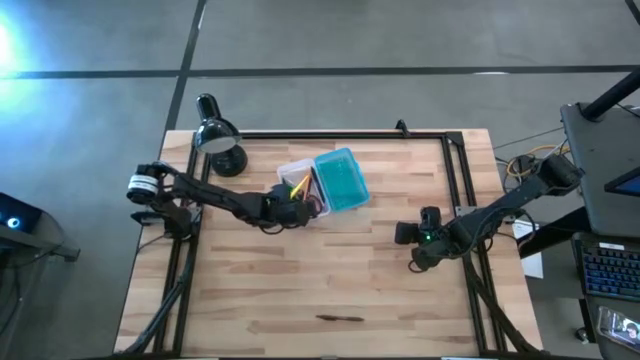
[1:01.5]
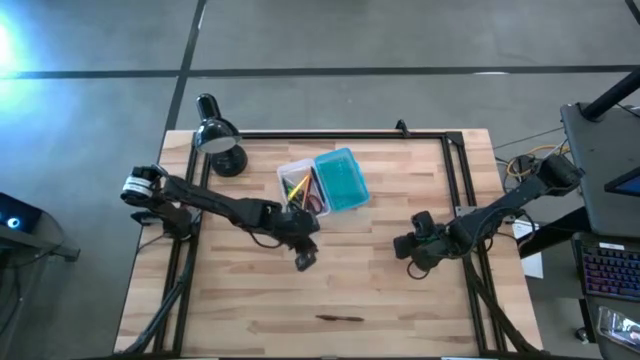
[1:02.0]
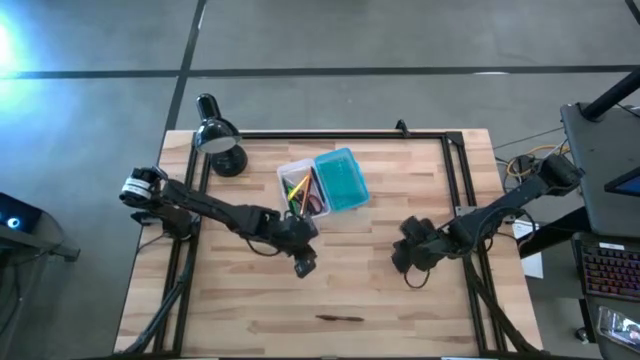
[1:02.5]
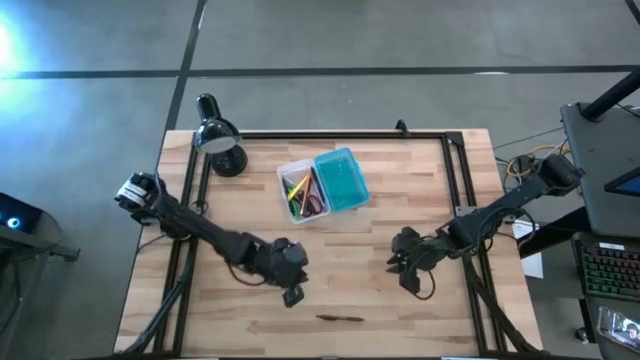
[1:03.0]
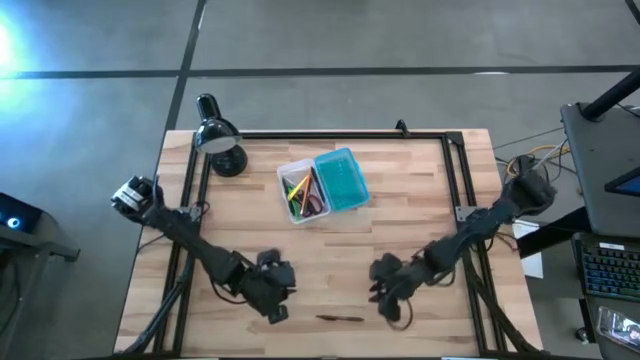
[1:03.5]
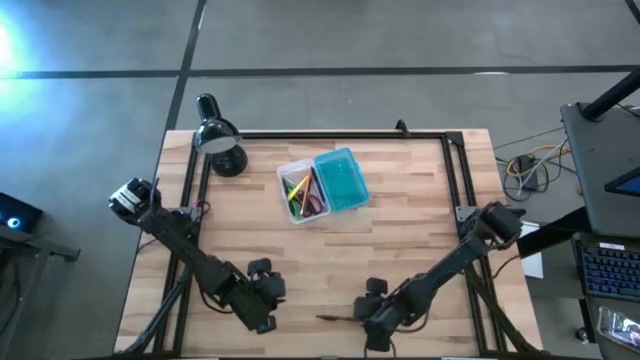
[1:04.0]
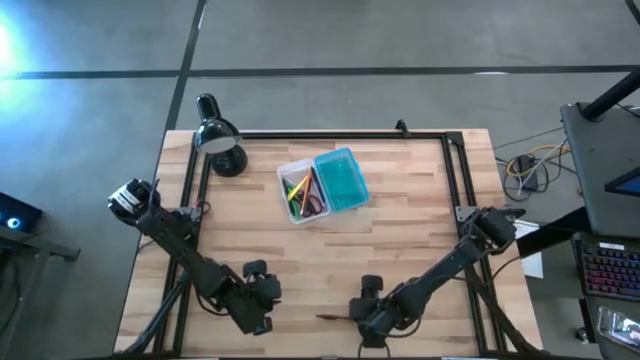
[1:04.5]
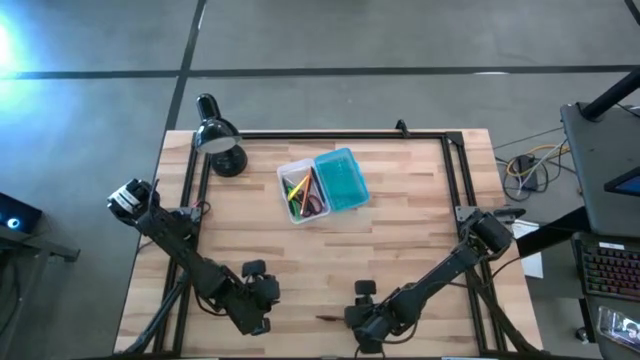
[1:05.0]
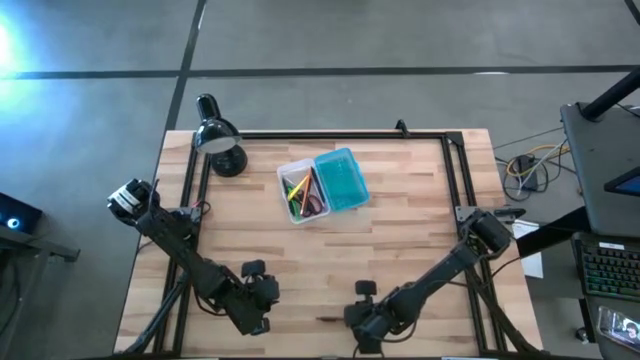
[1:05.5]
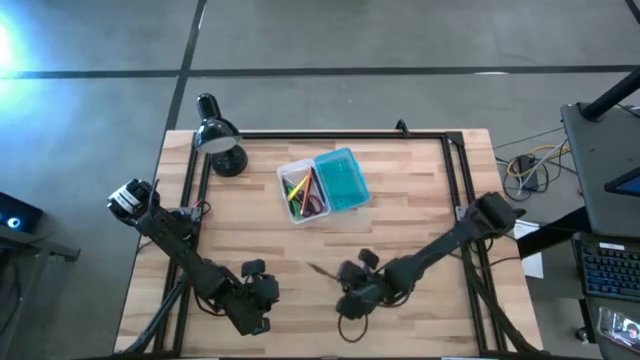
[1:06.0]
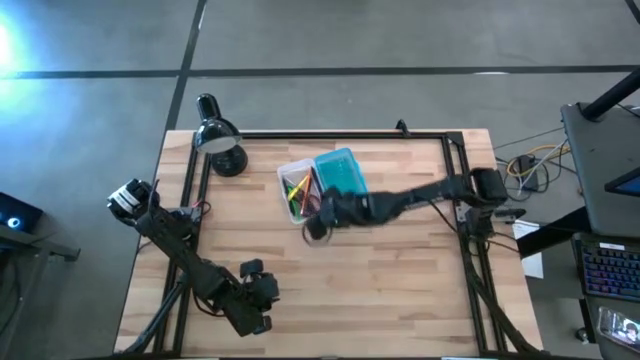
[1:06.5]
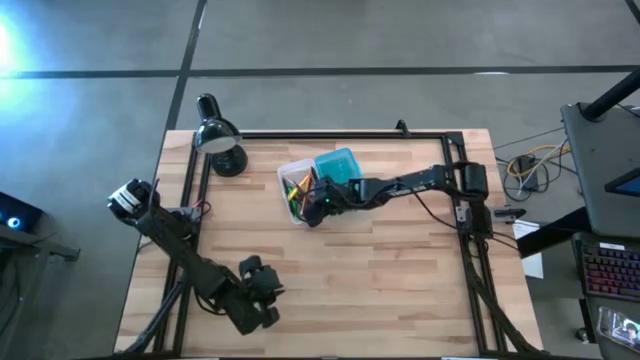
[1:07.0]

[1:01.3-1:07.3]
Task: Pick & place school supplies into a supply box
Put the brown pen into the supply box

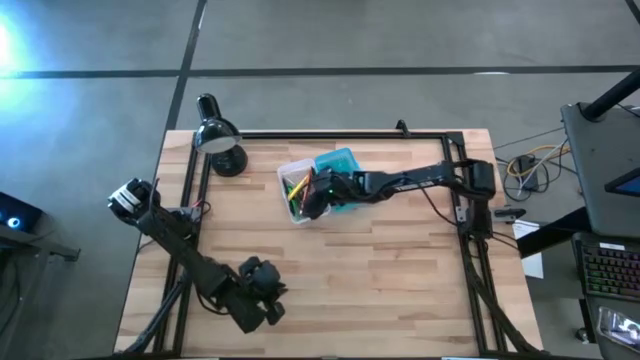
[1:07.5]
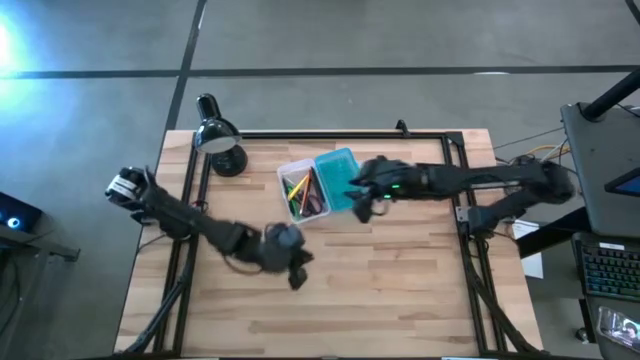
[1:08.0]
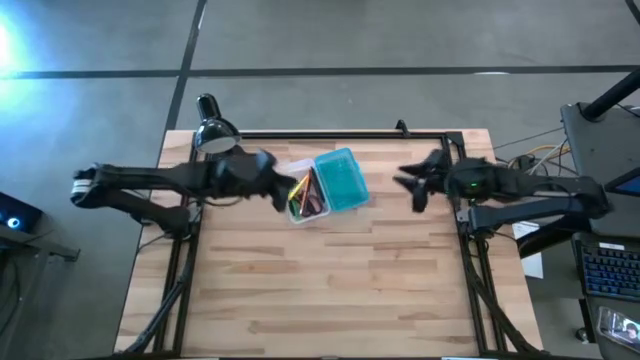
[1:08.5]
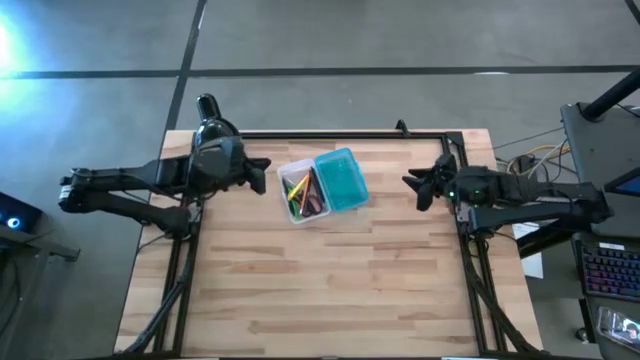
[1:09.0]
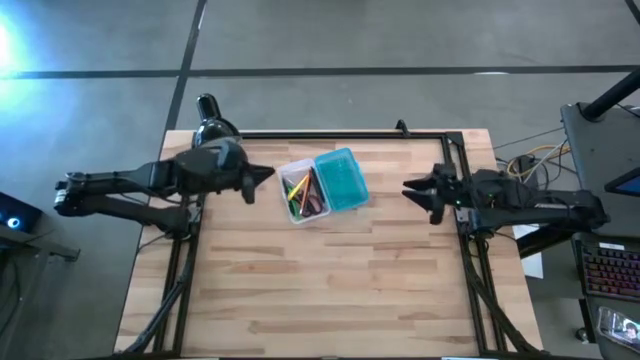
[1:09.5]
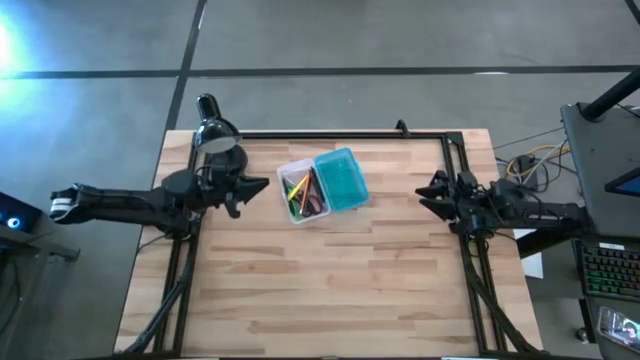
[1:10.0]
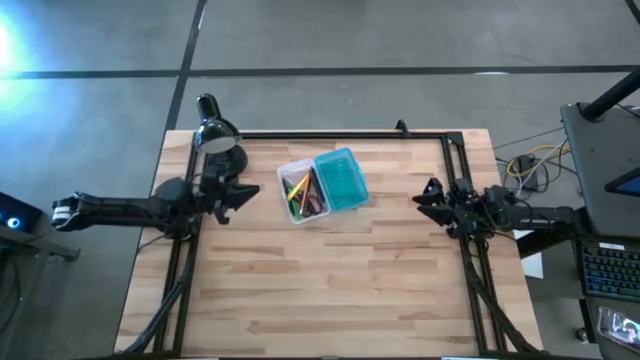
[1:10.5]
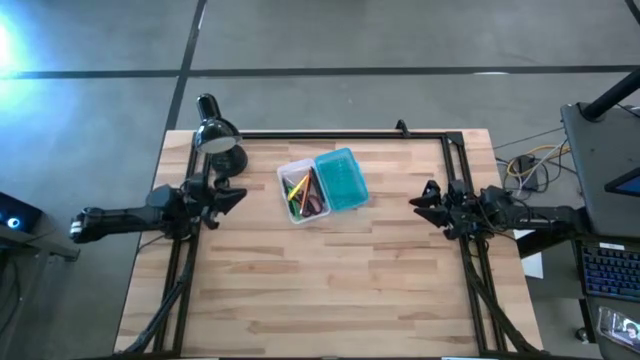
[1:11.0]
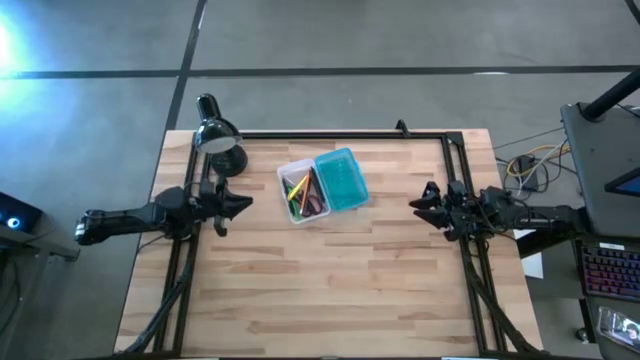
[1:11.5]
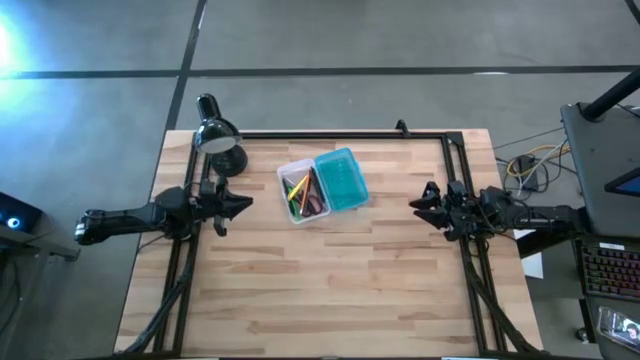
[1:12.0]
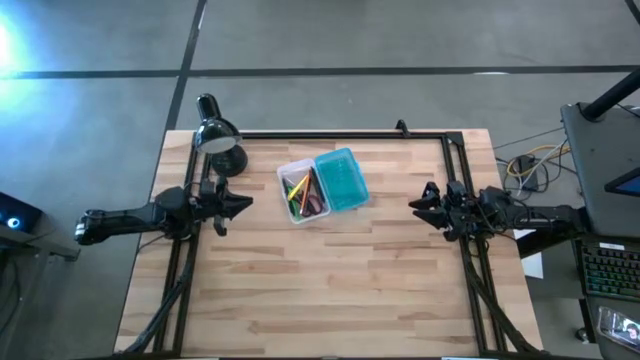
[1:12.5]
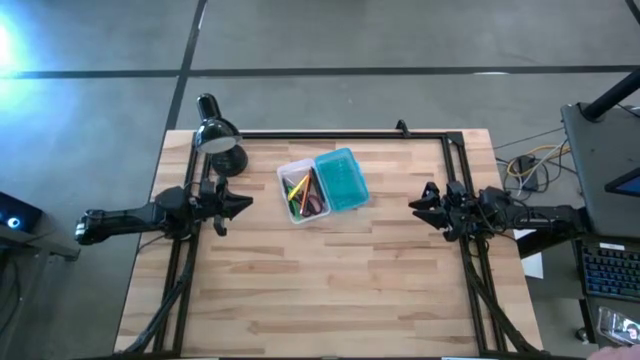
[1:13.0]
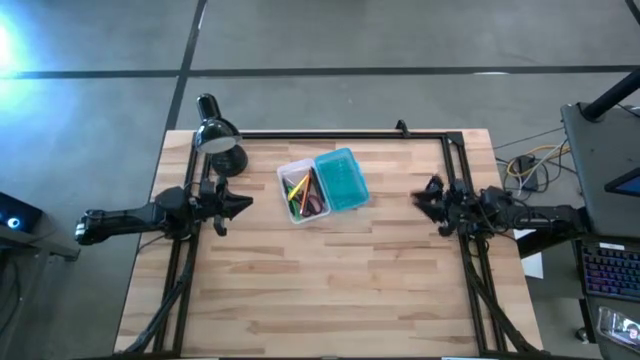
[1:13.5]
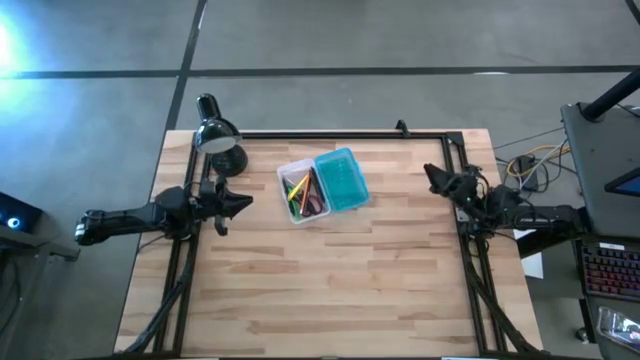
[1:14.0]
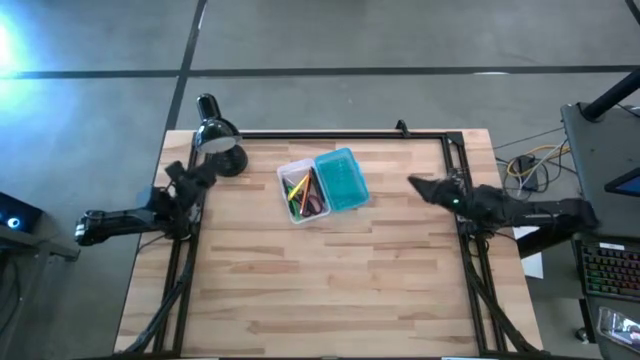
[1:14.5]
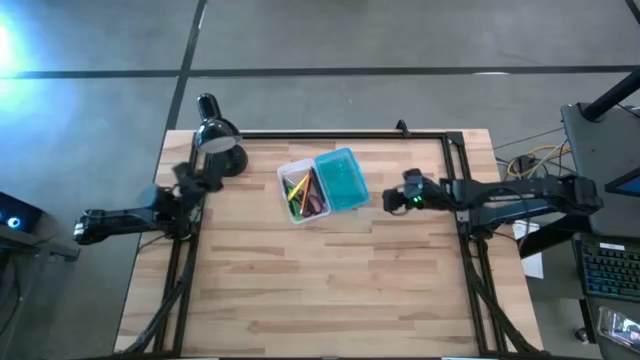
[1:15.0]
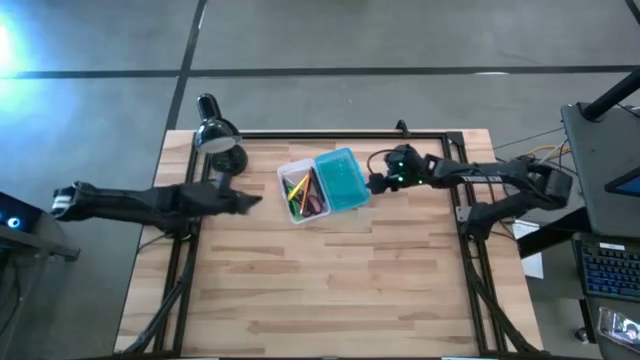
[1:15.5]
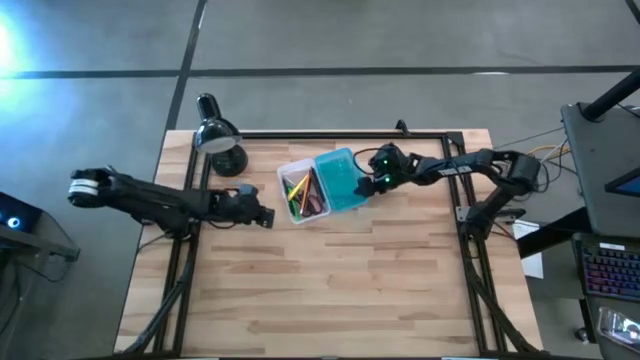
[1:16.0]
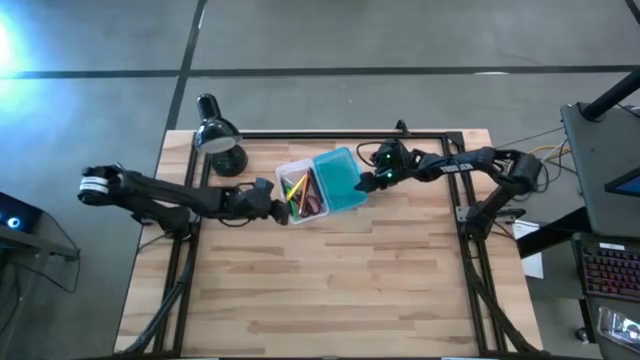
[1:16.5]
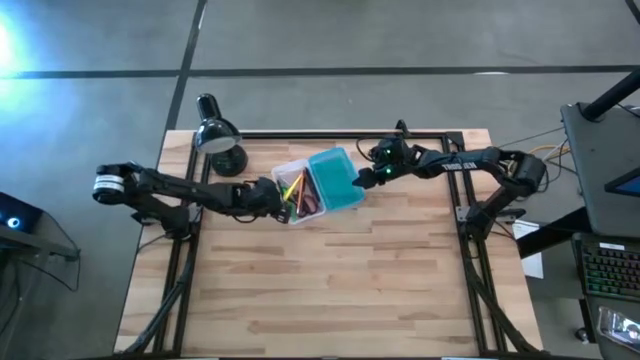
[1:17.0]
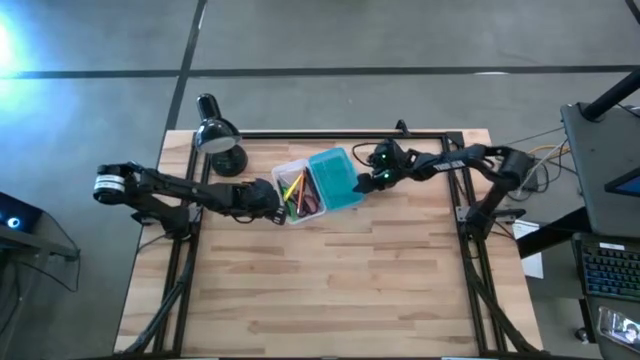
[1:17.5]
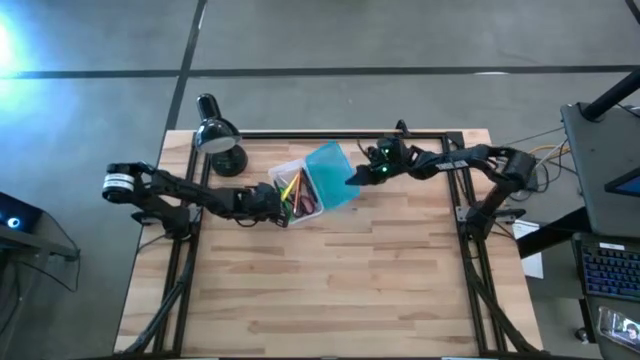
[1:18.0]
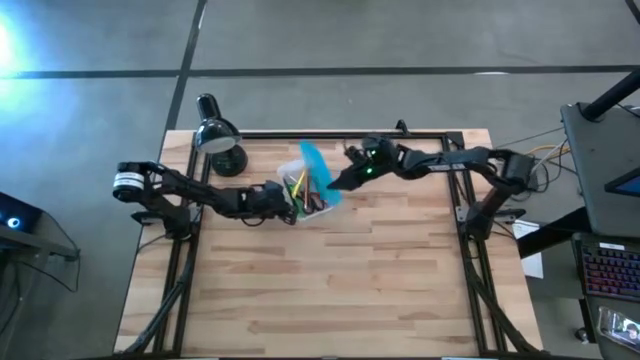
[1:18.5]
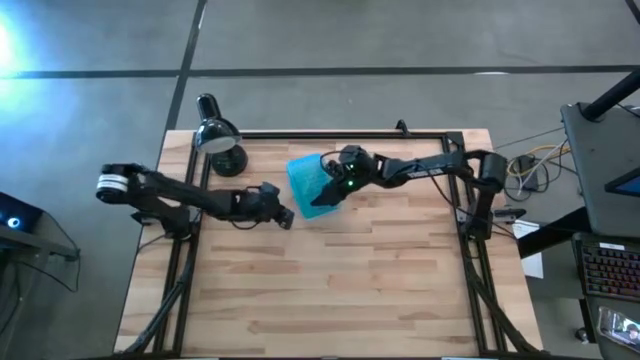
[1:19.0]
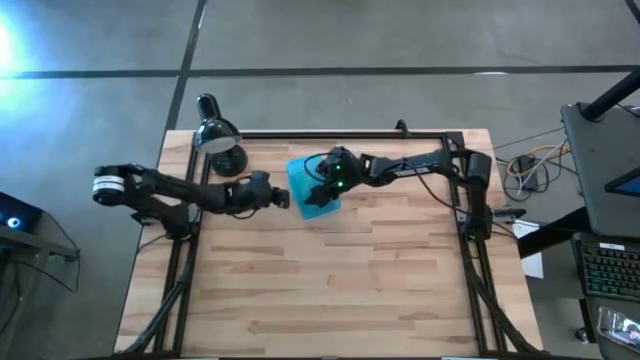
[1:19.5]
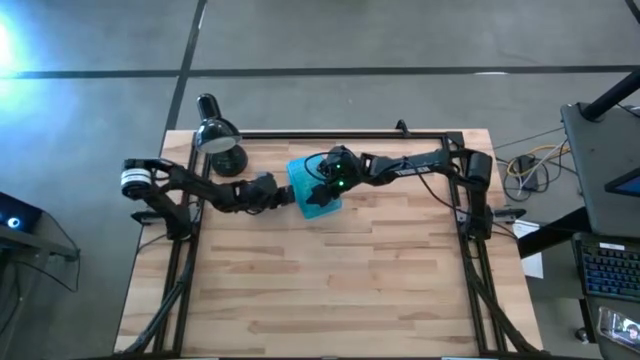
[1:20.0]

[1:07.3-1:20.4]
Close the supply box

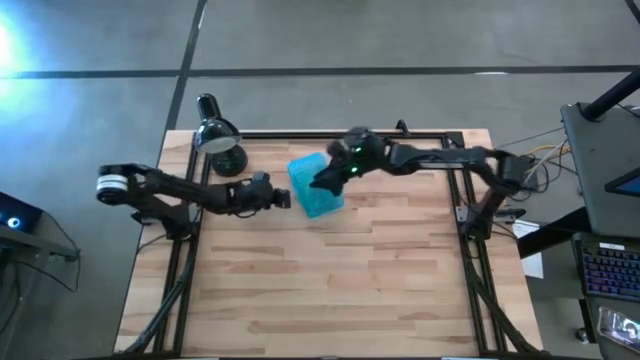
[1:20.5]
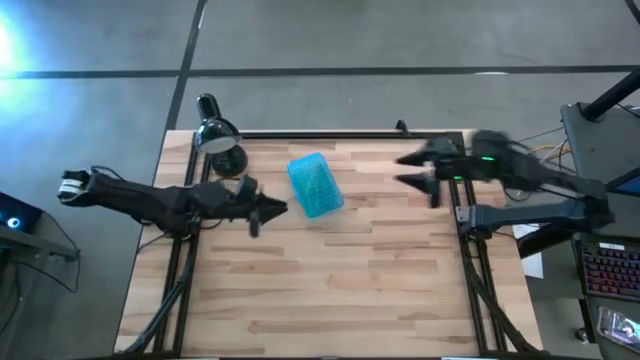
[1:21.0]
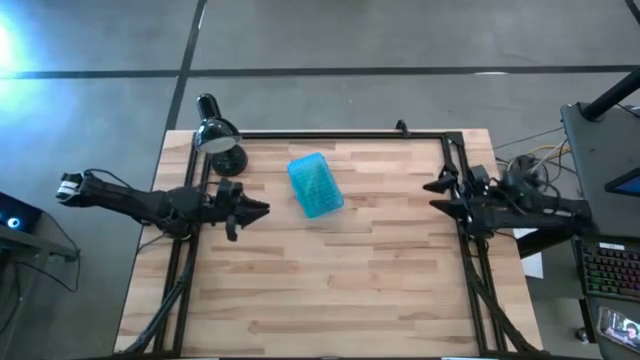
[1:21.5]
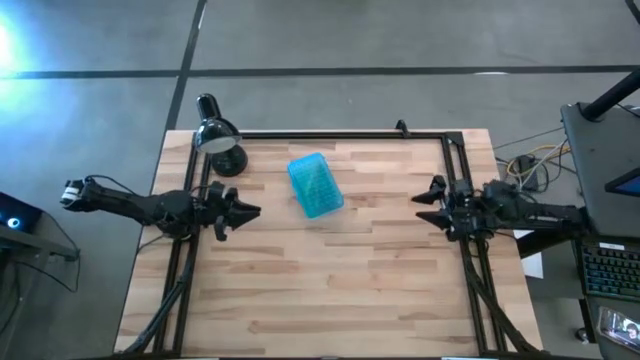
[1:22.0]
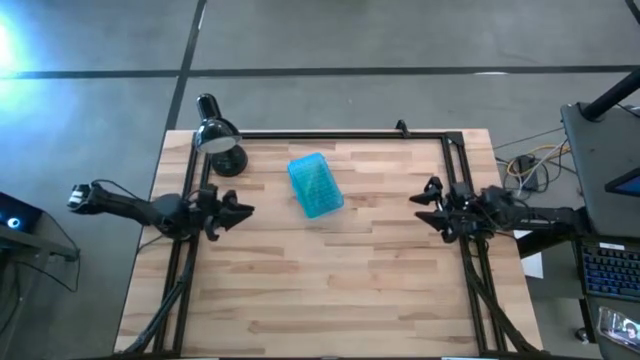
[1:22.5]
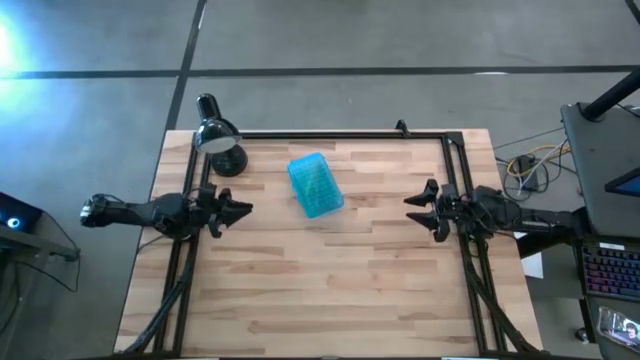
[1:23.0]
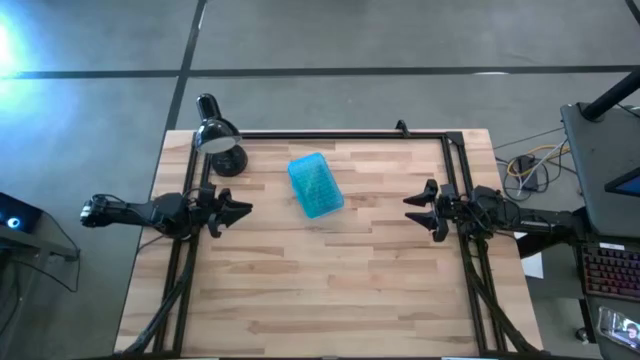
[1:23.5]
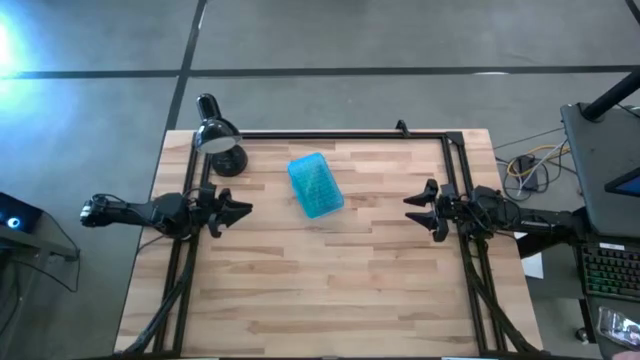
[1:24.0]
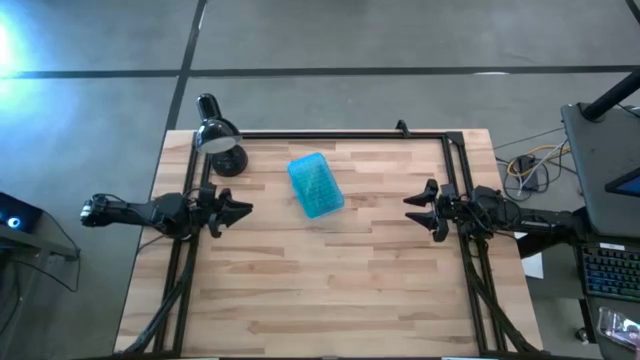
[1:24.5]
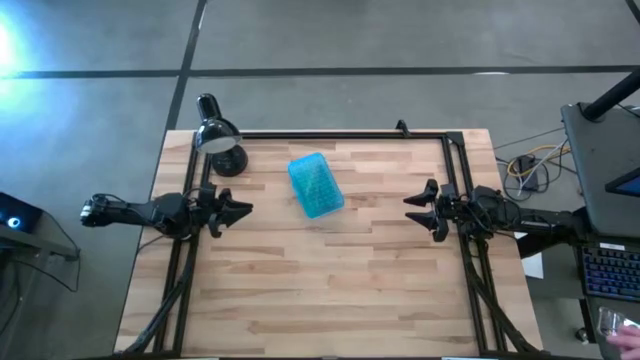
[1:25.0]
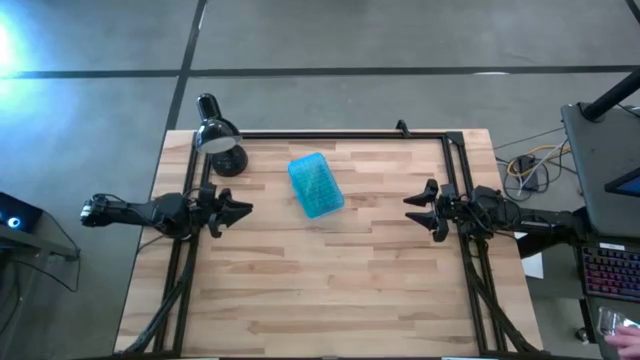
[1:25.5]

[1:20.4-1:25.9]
Return to Home Position
